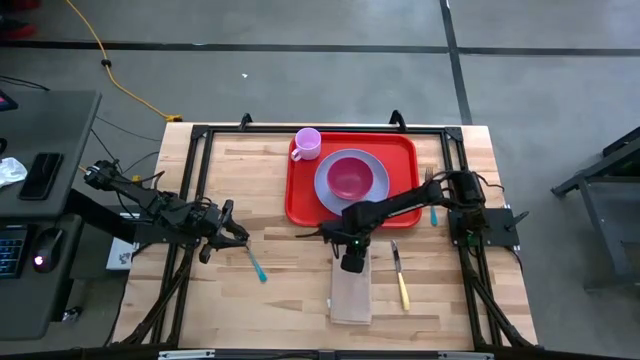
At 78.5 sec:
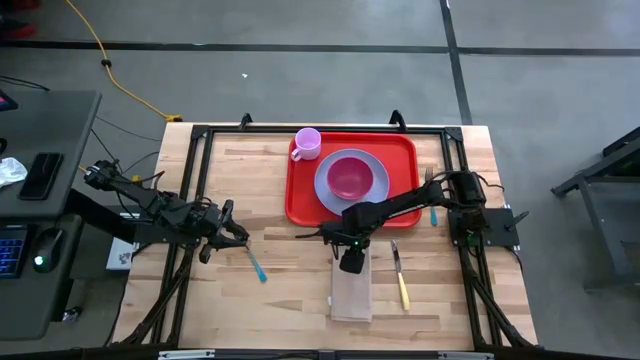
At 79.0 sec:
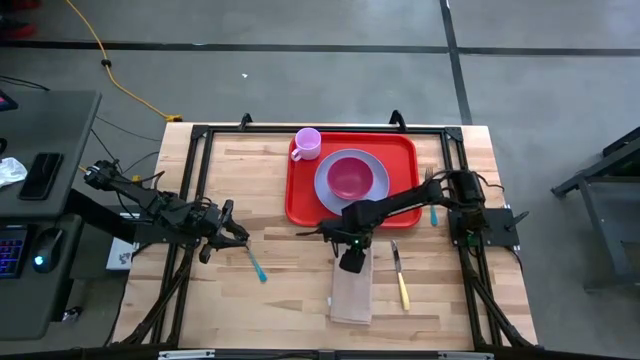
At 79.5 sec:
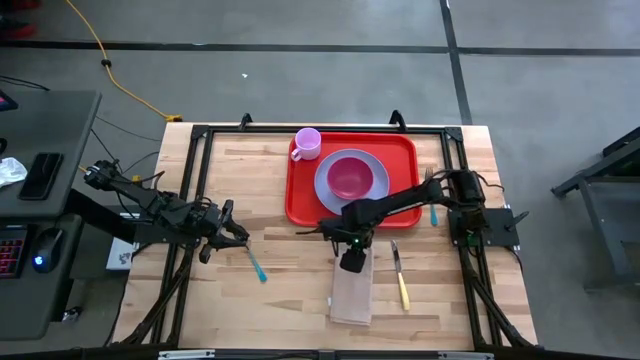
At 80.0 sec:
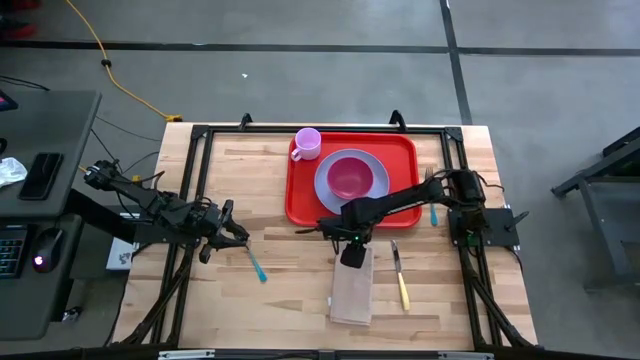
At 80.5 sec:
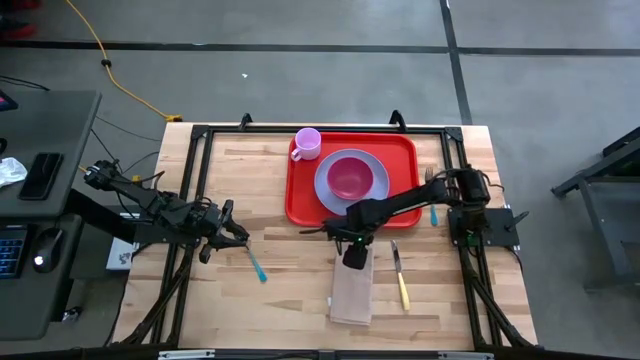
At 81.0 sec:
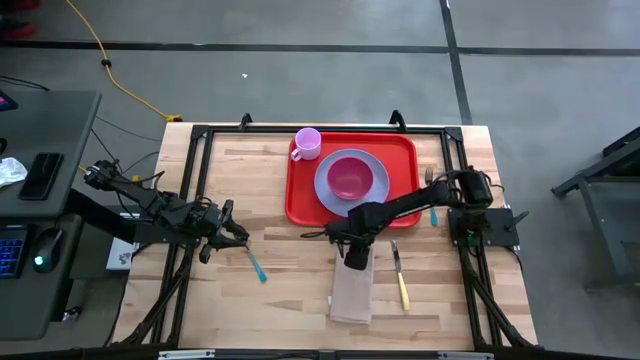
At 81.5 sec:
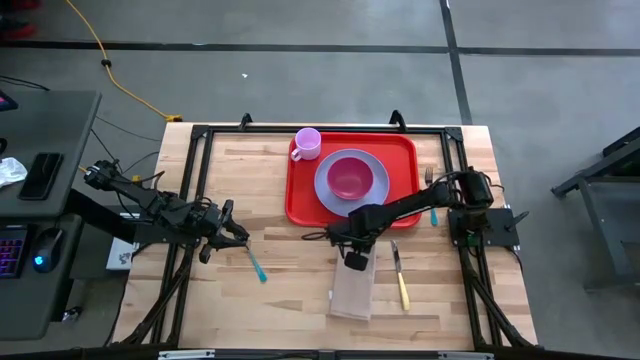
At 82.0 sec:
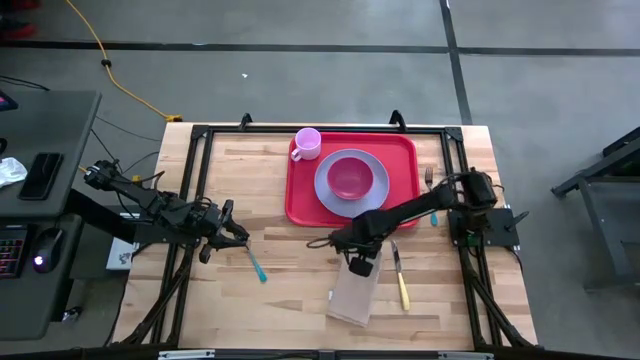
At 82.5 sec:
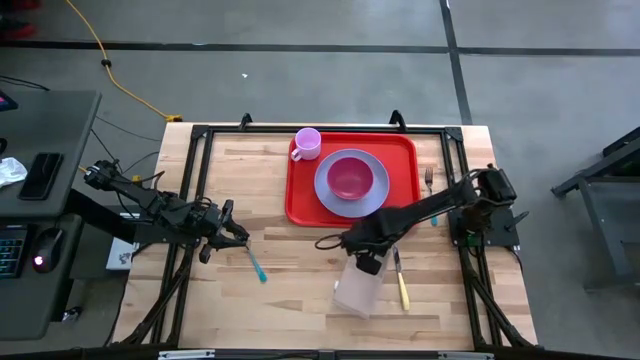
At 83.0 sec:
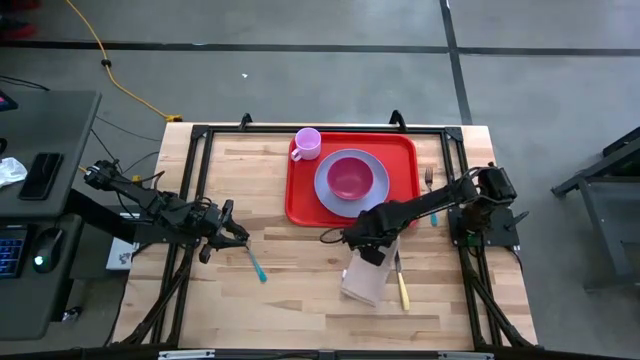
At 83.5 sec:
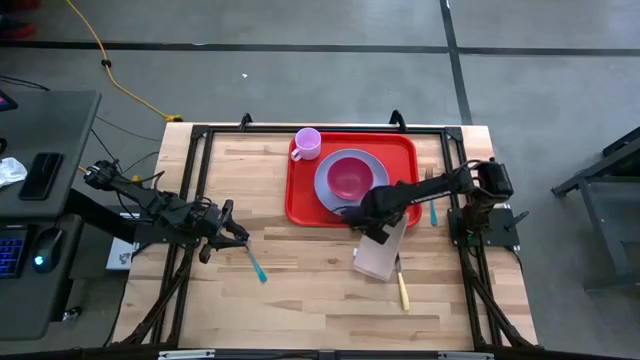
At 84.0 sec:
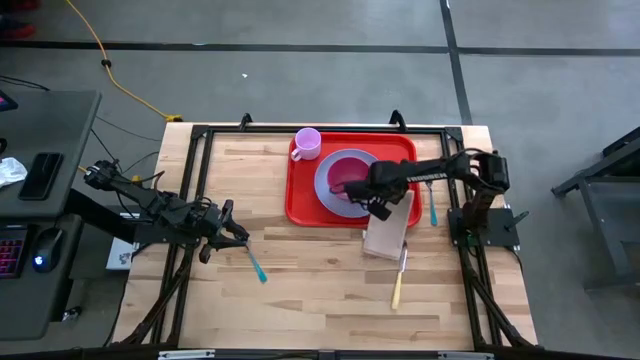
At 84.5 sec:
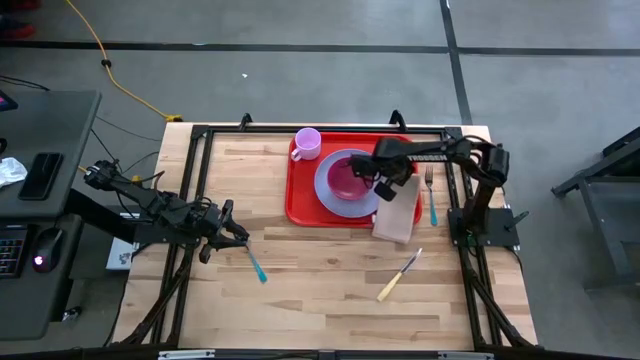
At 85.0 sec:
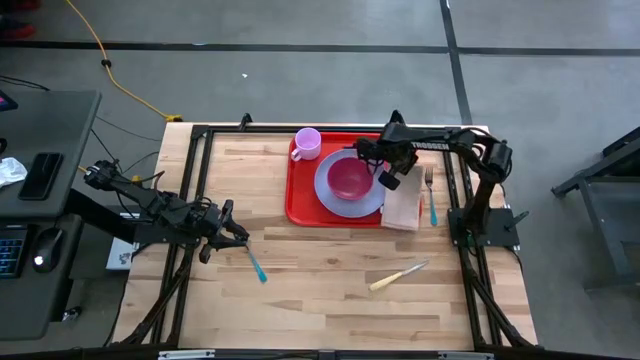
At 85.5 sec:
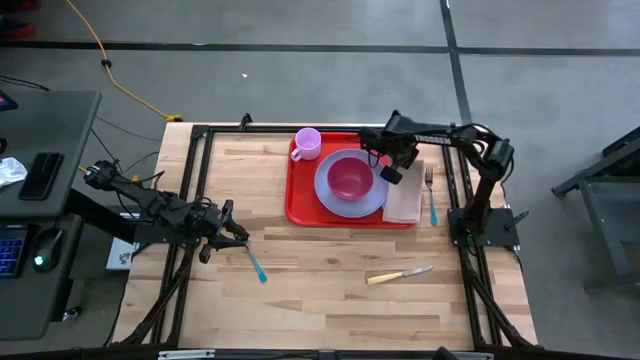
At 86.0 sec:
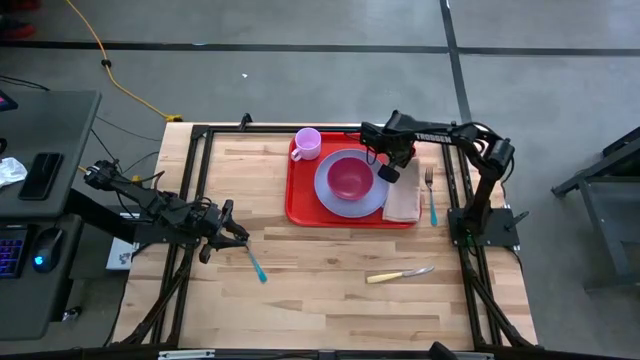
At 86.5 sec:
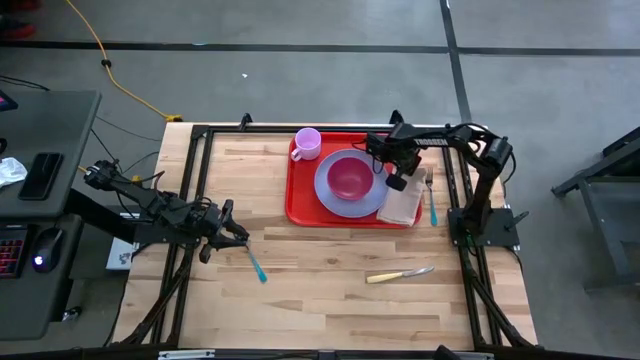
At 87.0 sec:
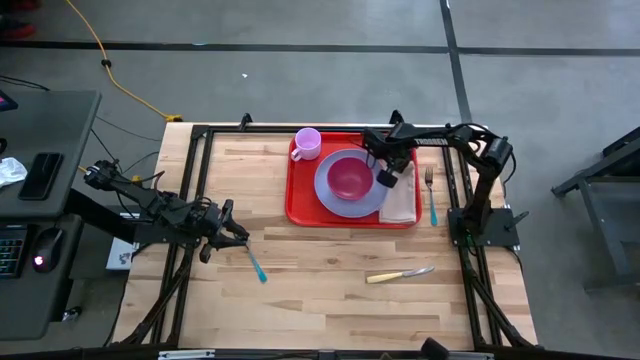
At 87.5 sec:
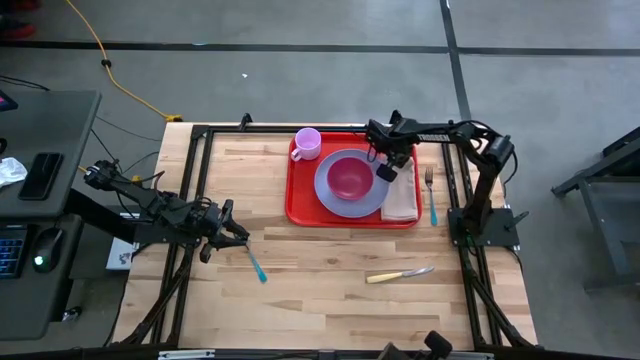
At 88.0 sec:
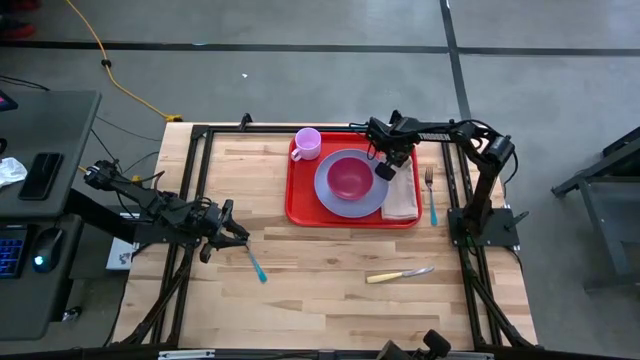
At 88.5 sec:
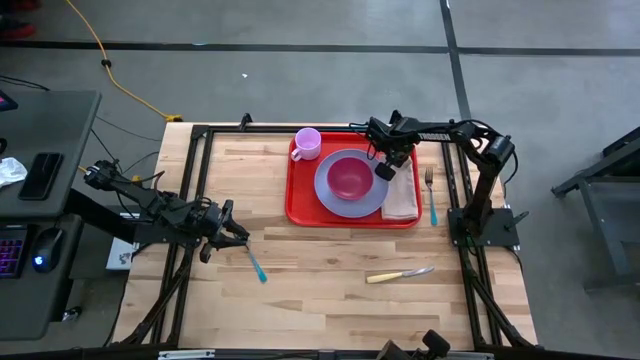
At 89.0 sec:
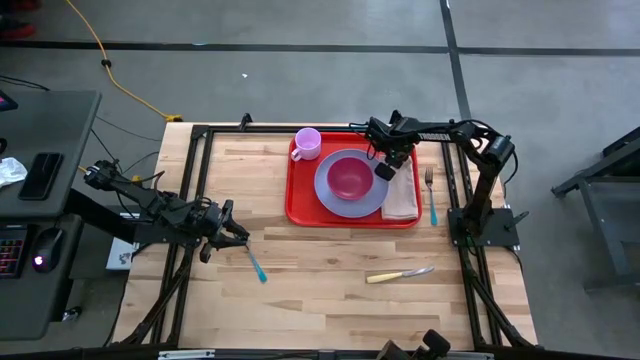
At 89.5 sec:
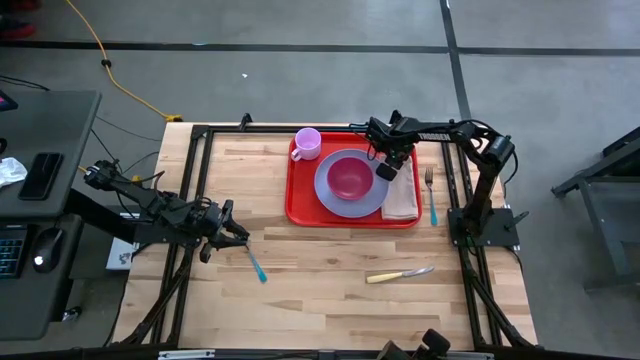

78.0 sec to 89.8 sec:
Task: Set up tray
Put the white napkin to the right of the blue plate on the red serving tray
